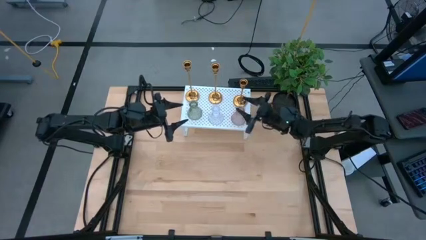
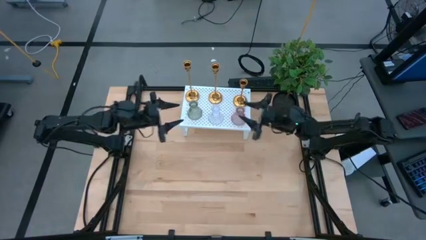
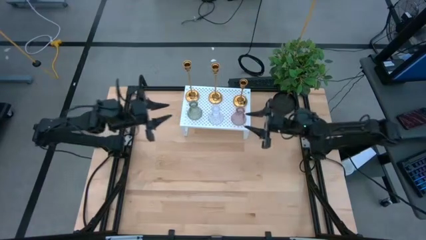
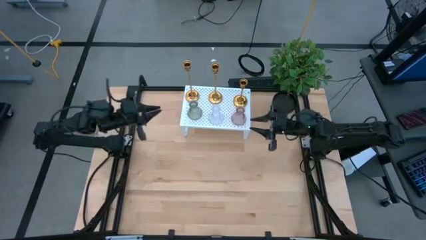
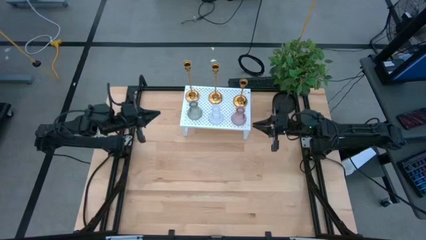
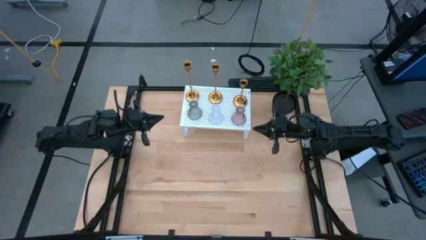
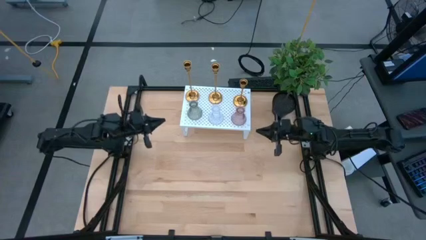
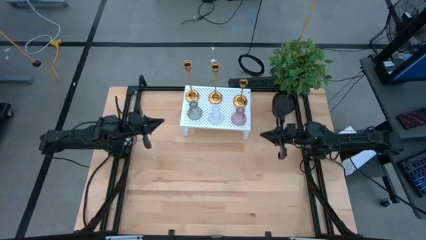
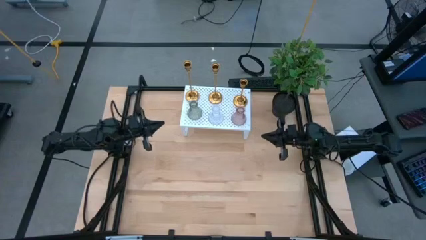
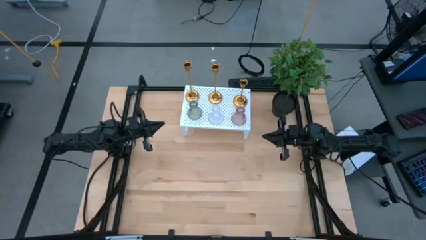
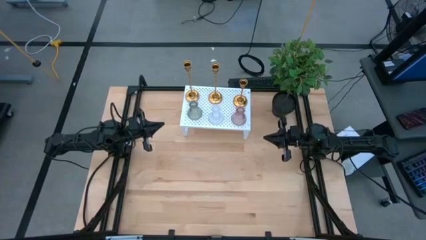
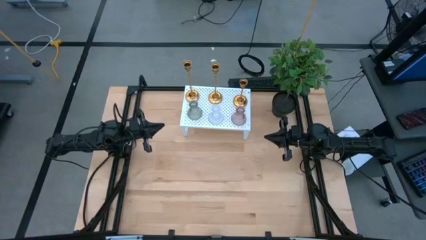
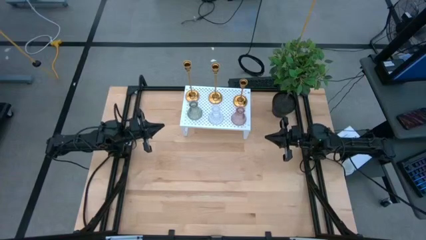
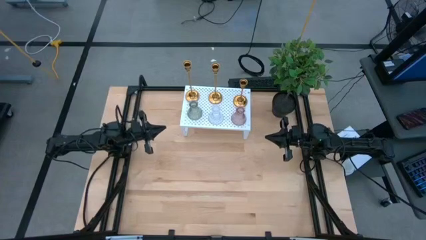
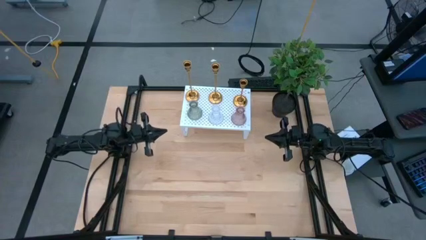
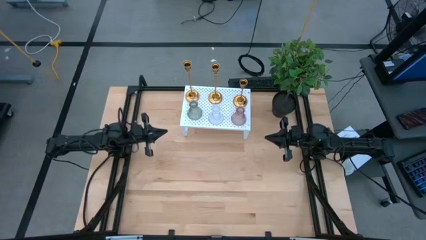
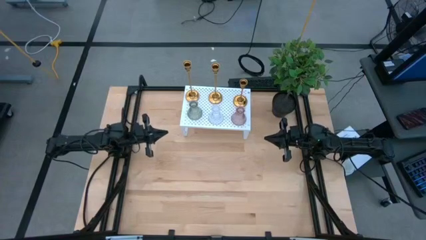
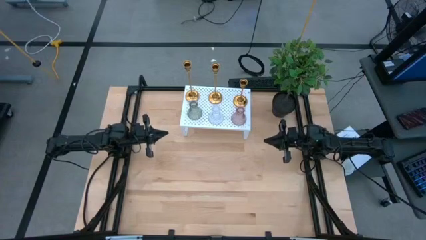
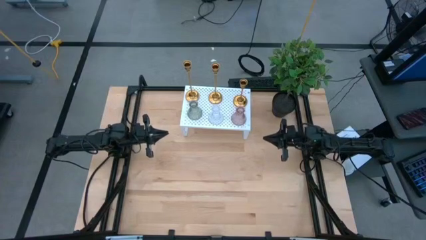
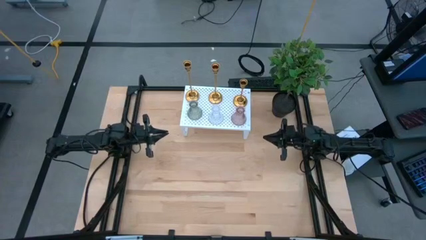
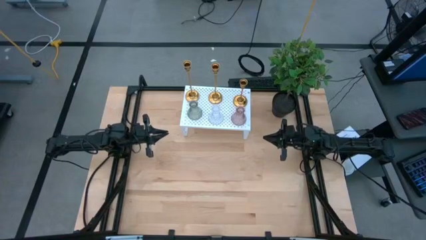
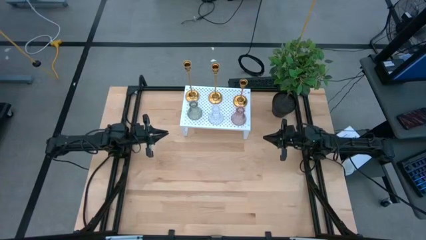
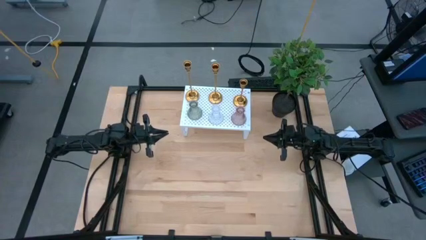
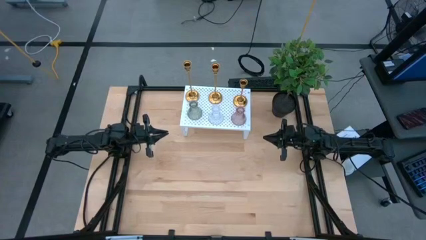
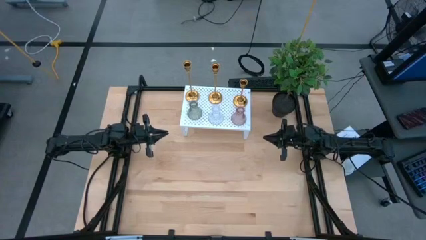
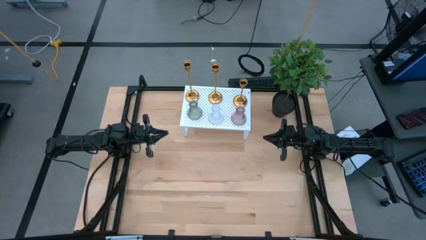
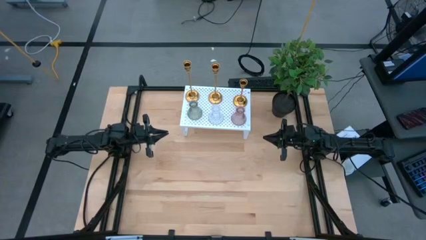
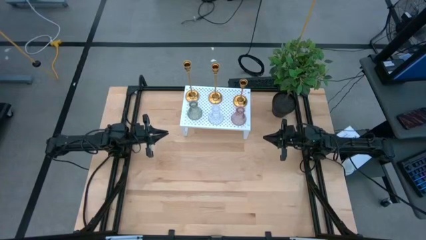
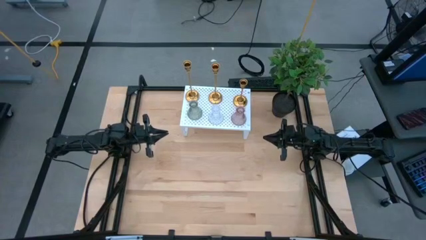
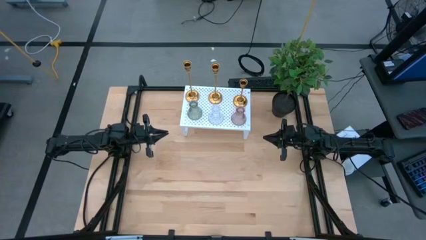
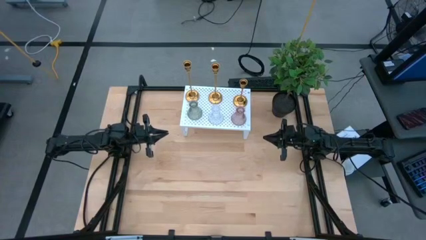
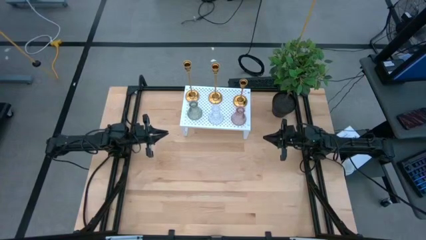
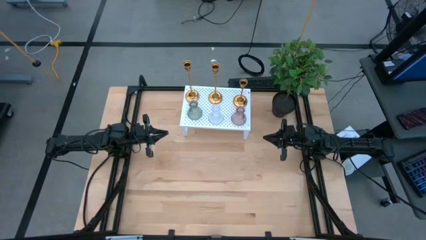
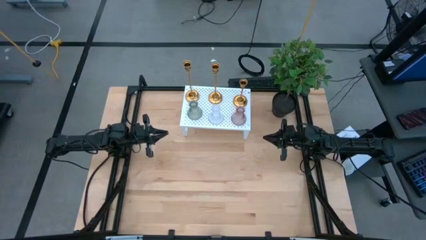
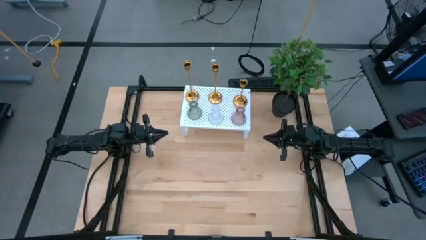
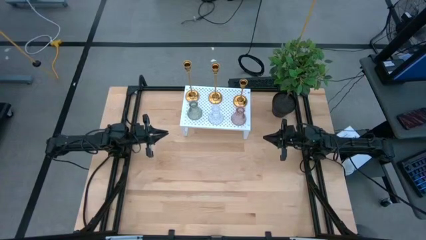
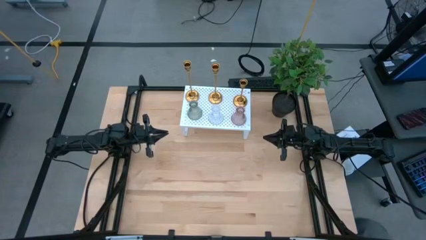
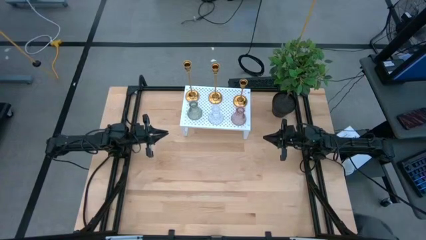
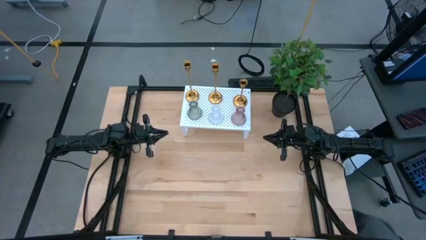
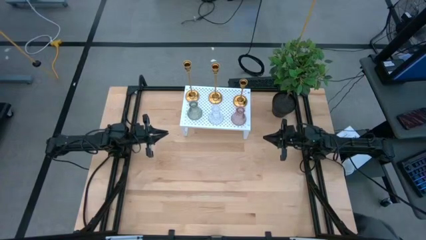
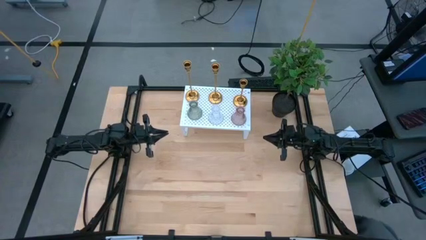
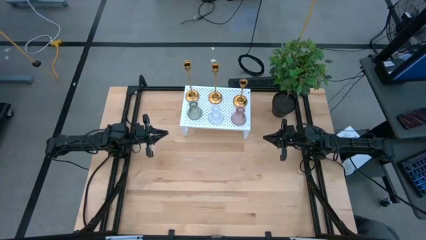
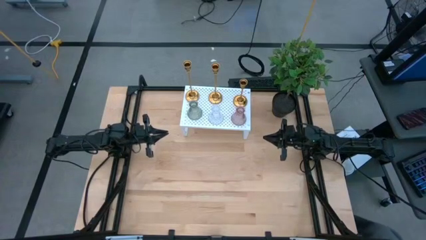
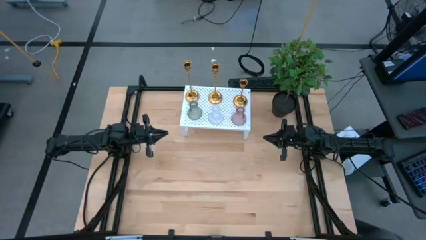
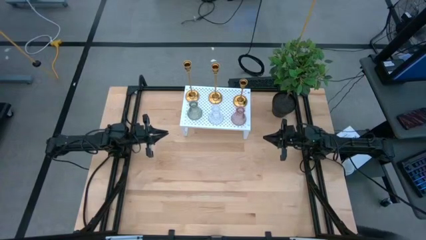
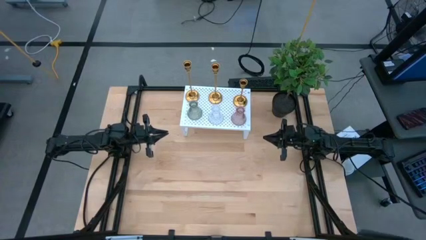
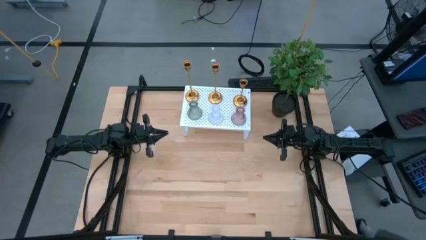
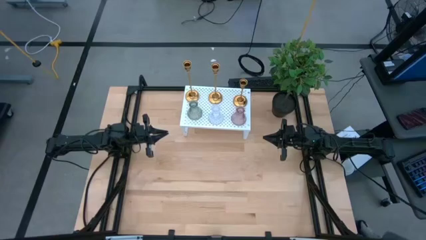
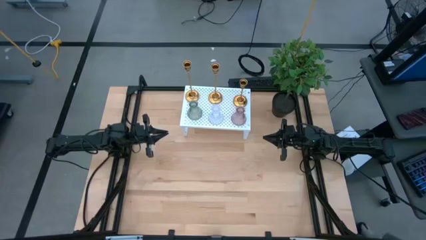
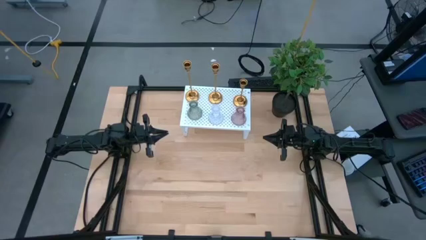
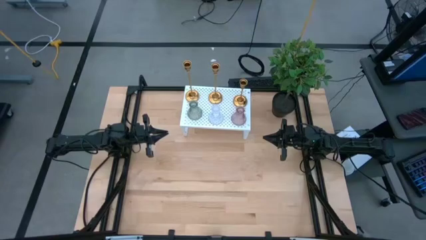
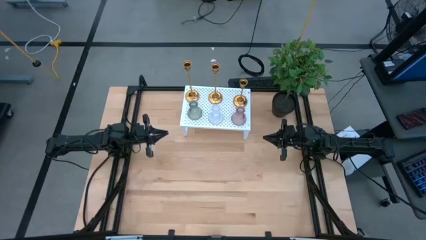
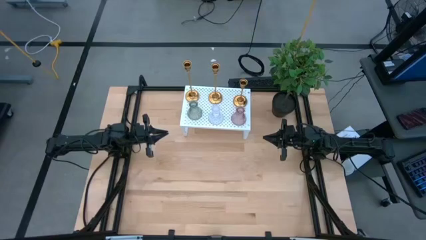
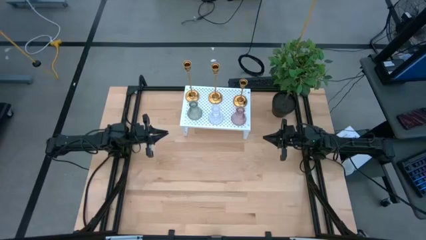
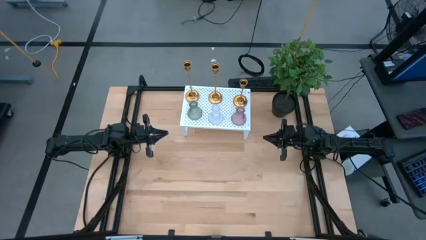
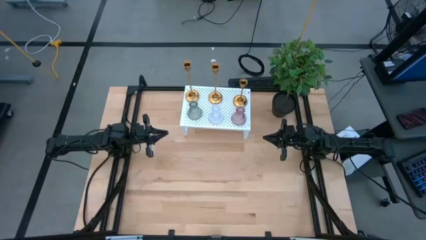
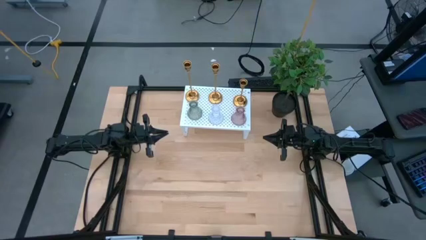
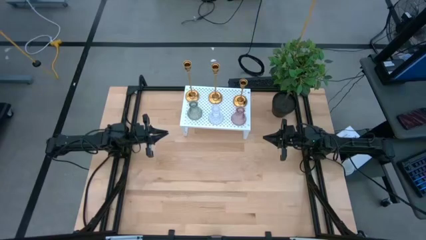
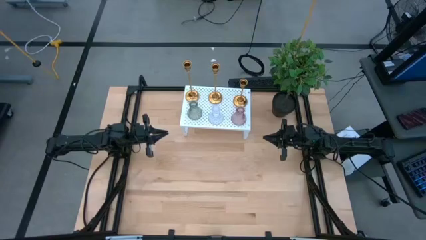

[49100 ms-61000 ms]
Task: Pick & Place candle stick holders
Return to Home Position
